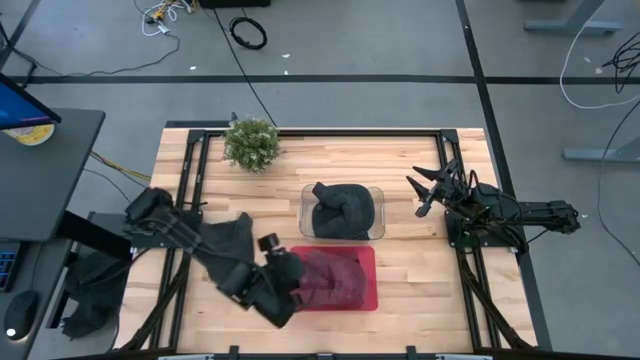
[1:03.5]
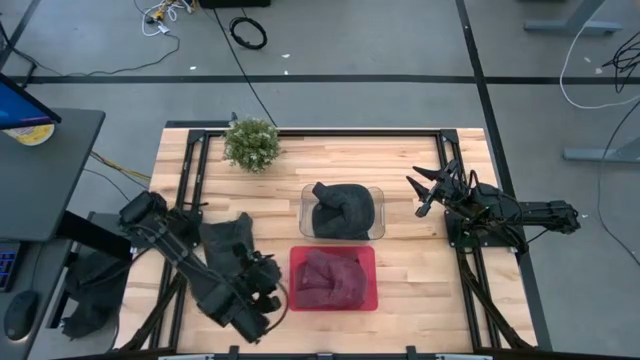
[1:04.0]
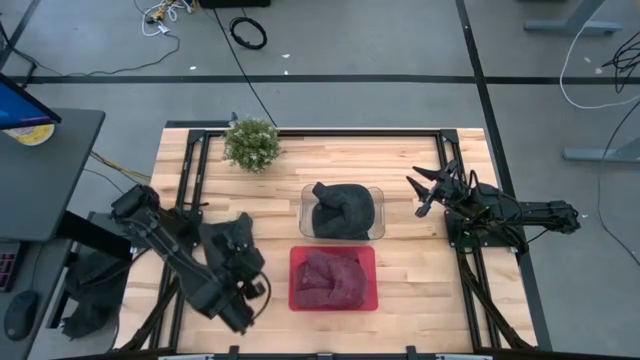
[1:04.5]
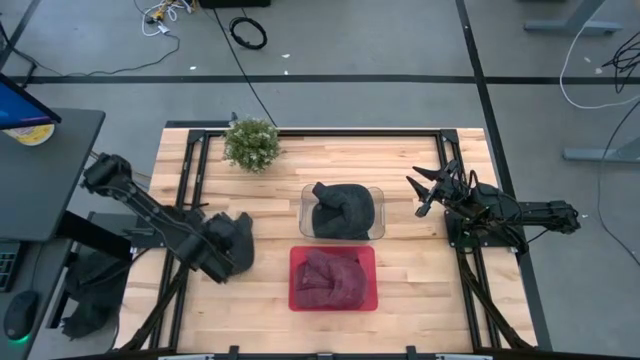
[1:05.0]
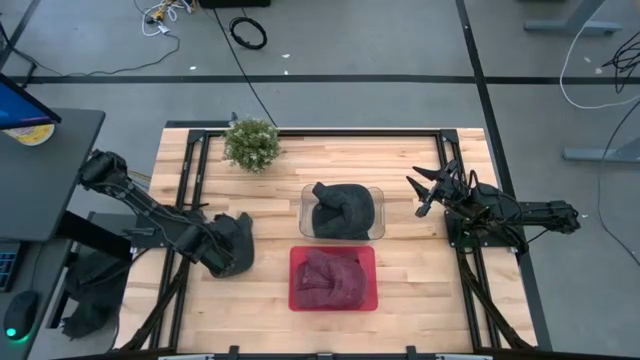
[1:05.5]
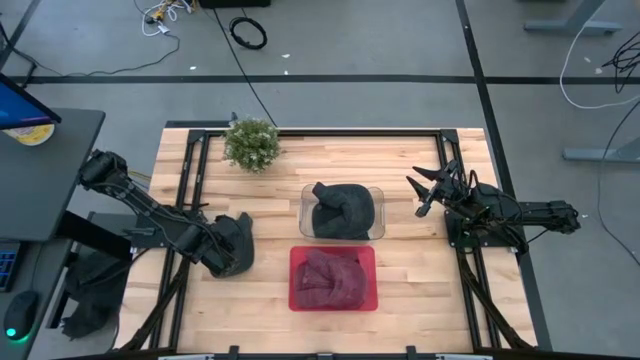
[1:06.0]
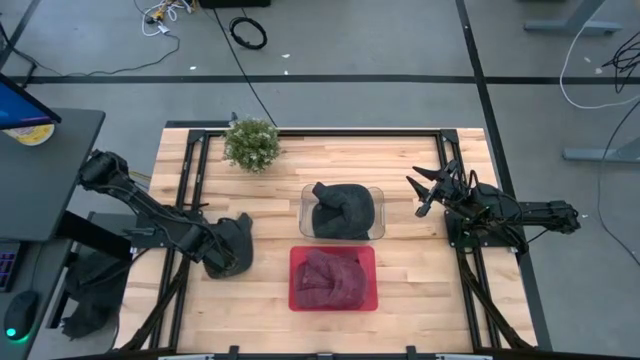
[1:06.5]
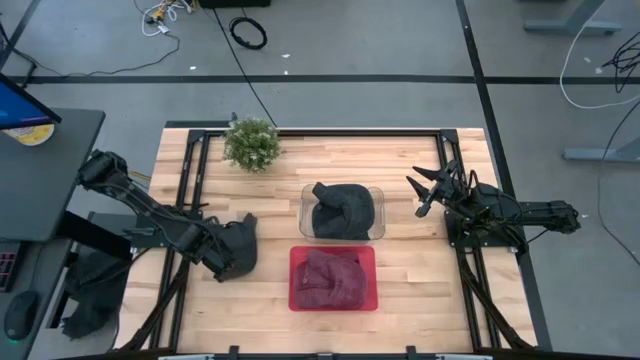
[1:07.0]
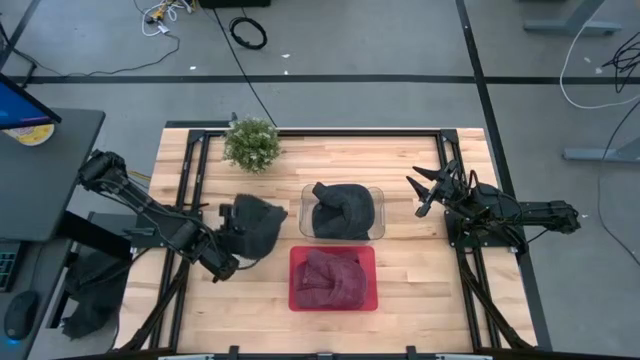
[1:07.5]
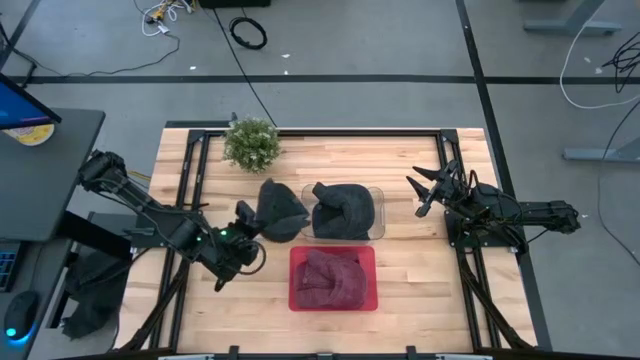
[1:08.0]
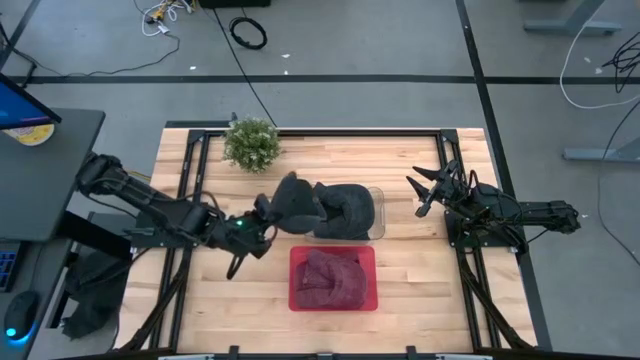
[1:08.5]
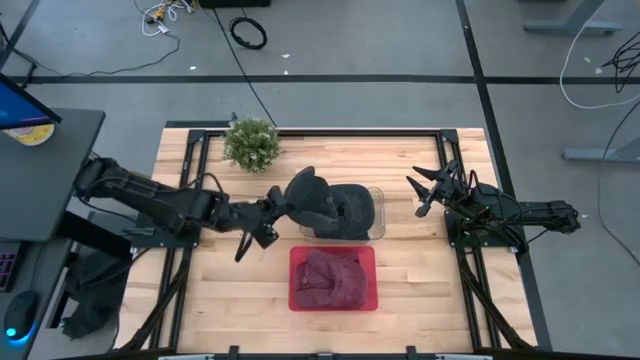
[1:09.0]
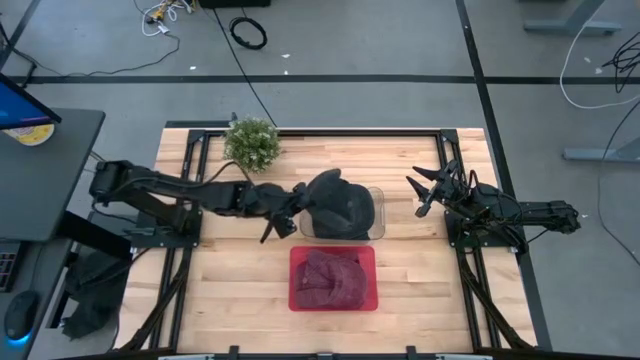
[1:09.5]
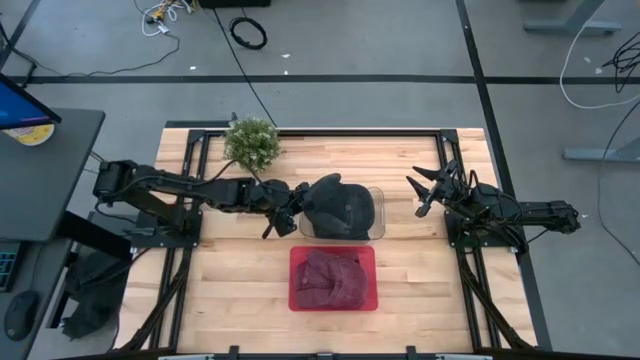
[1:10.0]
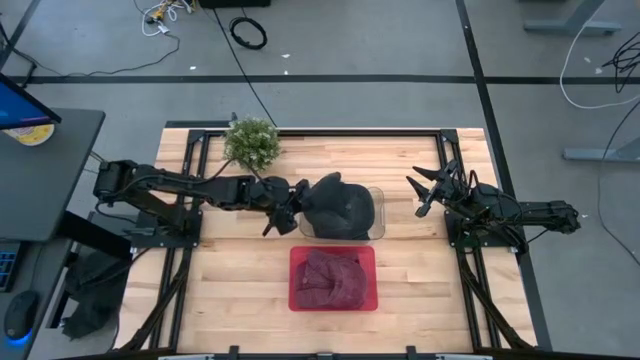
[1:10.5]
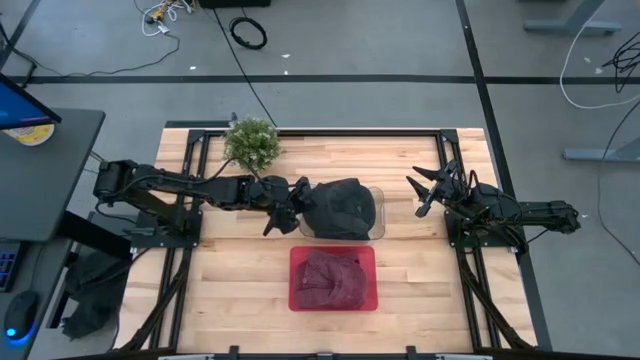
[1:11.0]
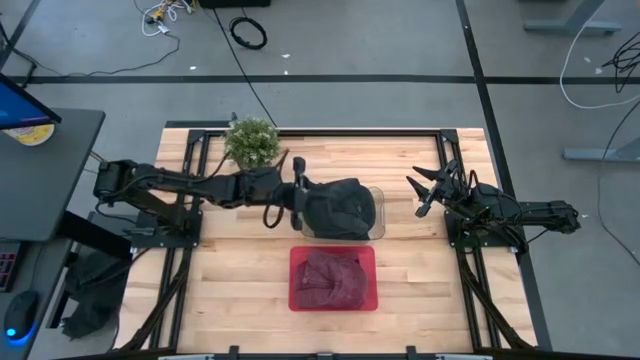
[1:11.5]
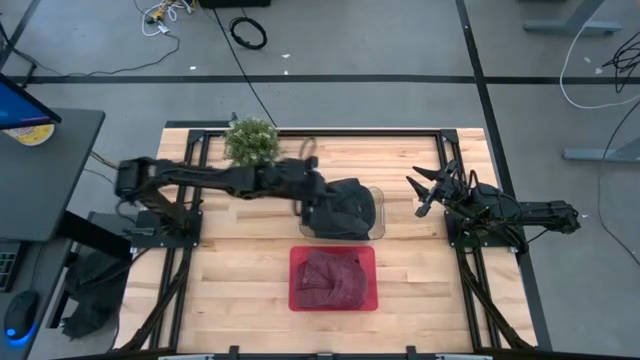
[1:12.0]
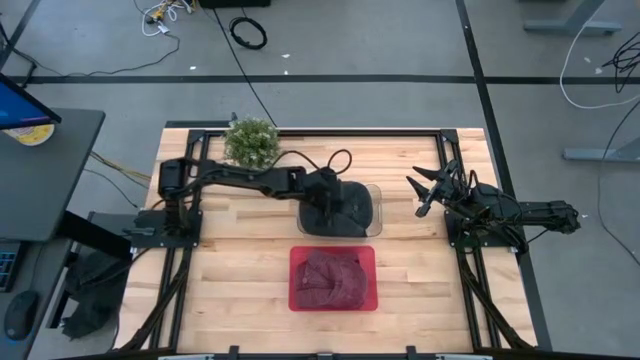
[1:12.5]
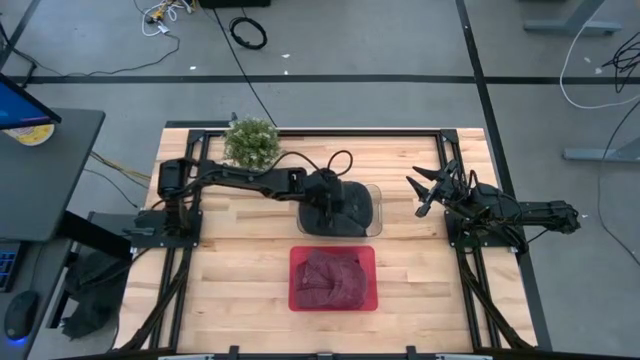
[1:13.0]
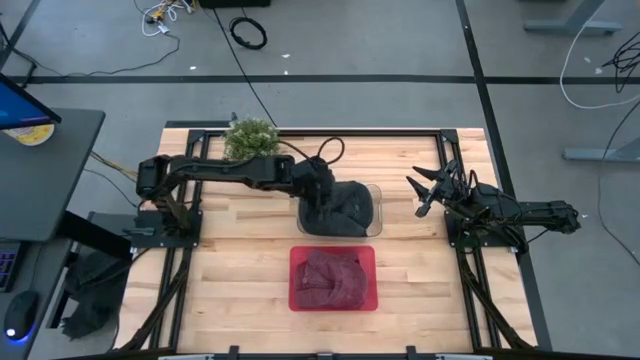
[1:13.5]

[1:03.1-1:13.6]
Task: Pick & Place hat
Put the black cap into the transparent bin

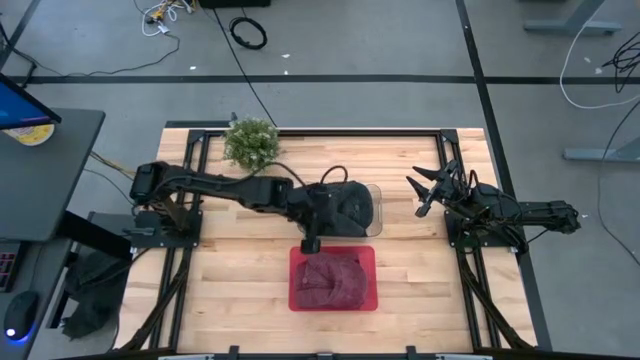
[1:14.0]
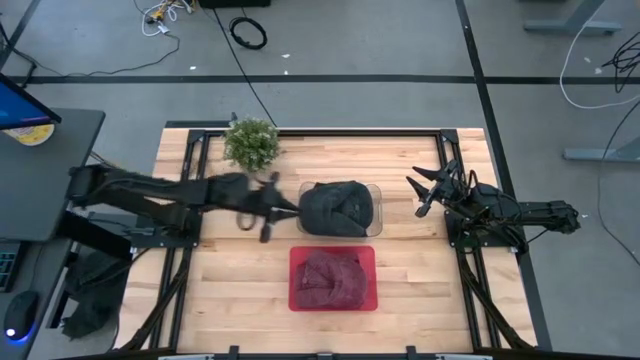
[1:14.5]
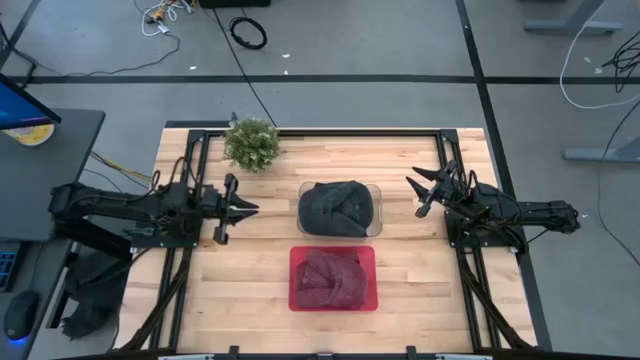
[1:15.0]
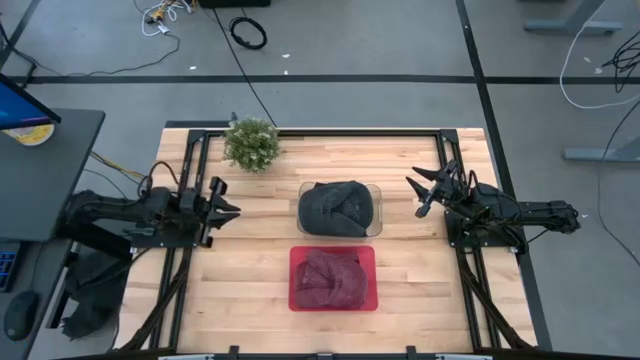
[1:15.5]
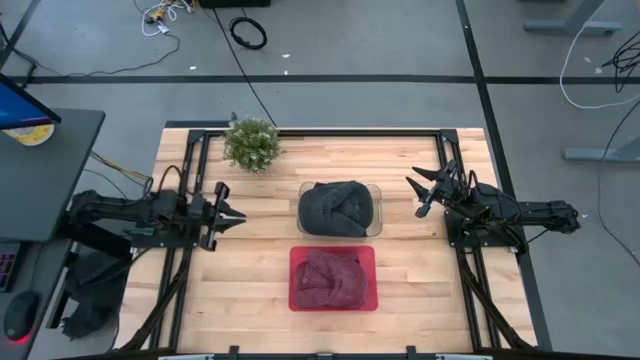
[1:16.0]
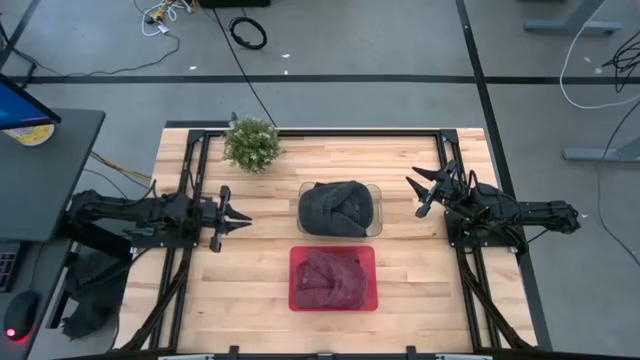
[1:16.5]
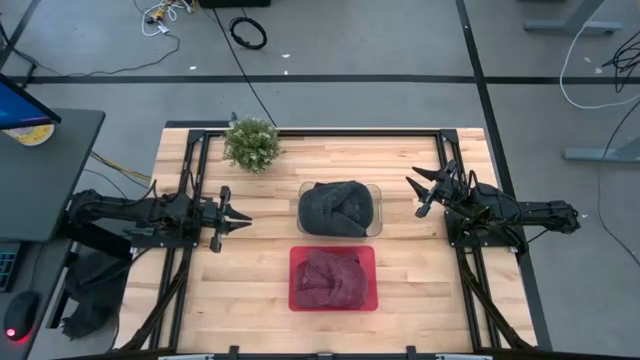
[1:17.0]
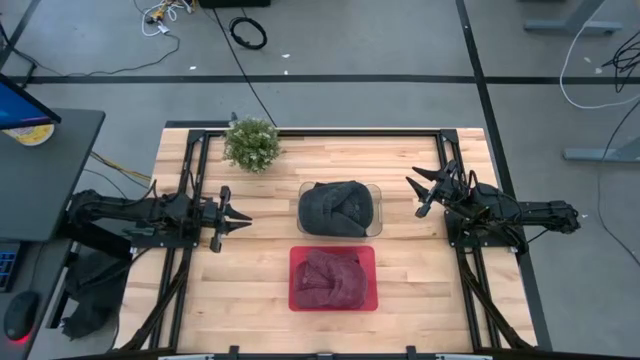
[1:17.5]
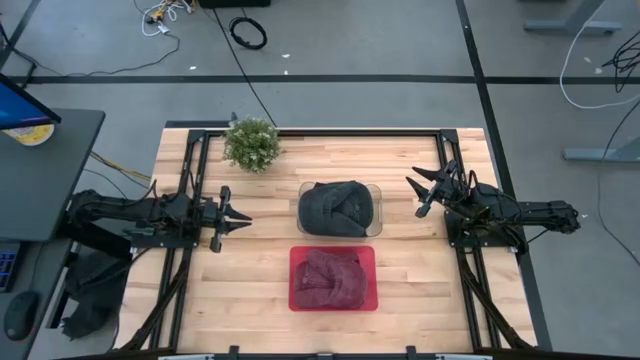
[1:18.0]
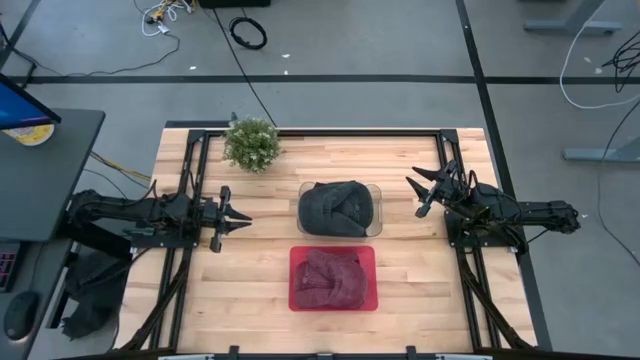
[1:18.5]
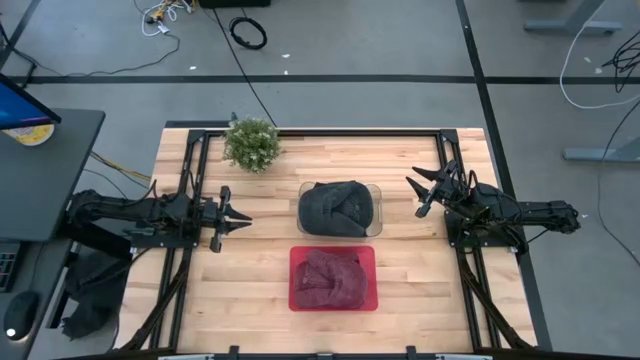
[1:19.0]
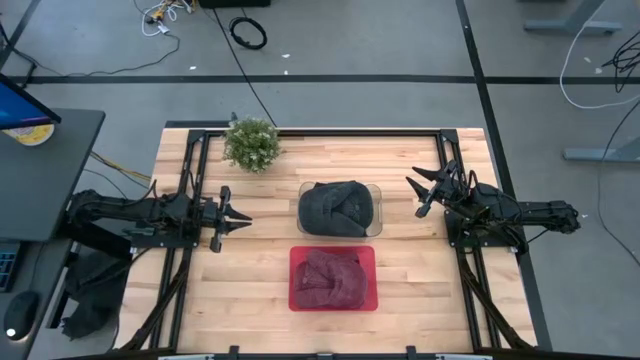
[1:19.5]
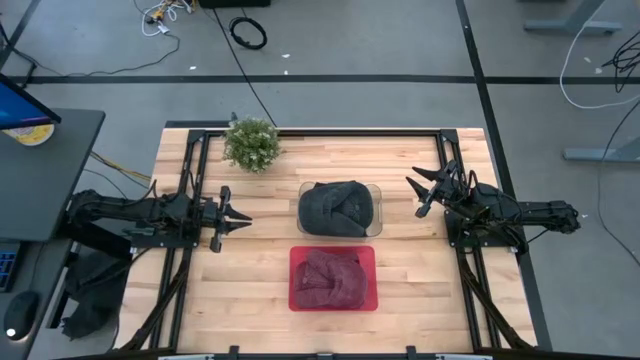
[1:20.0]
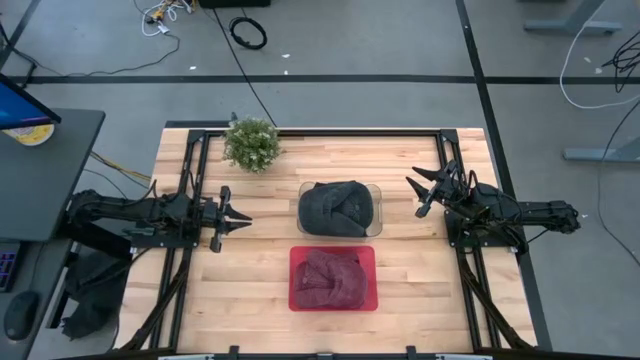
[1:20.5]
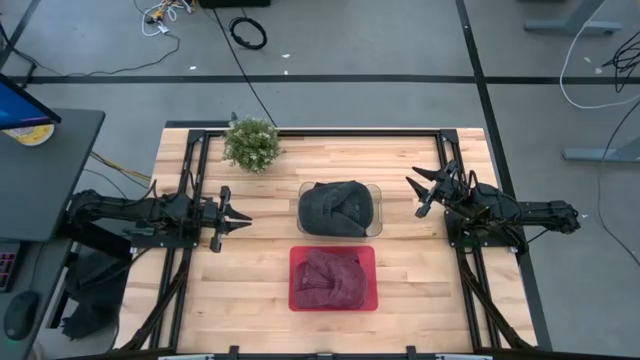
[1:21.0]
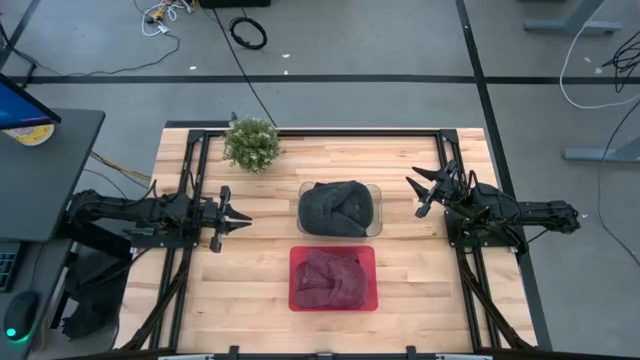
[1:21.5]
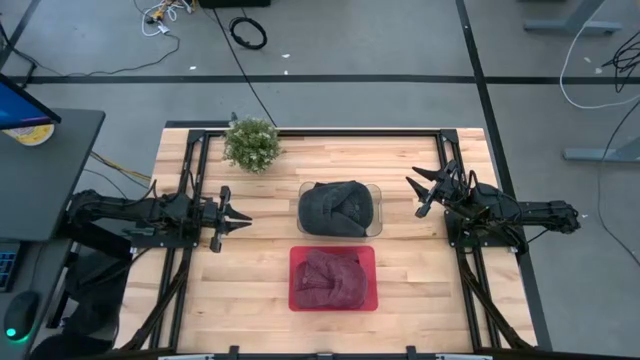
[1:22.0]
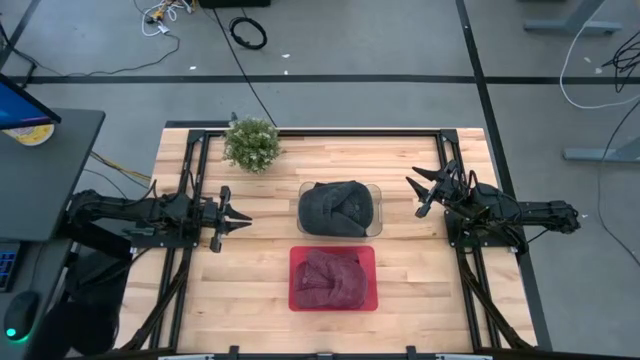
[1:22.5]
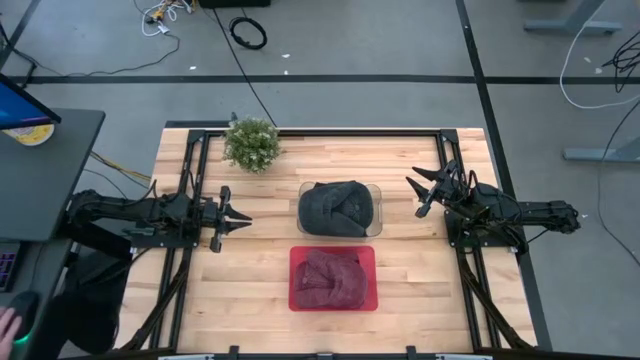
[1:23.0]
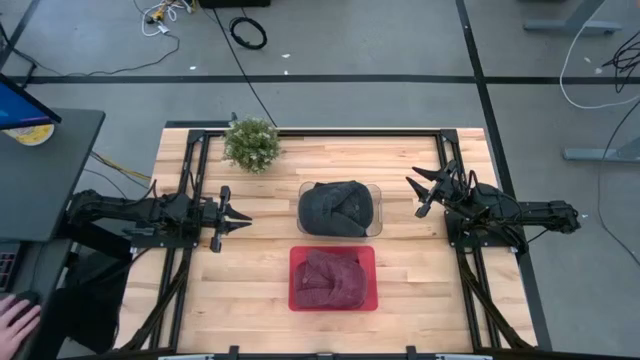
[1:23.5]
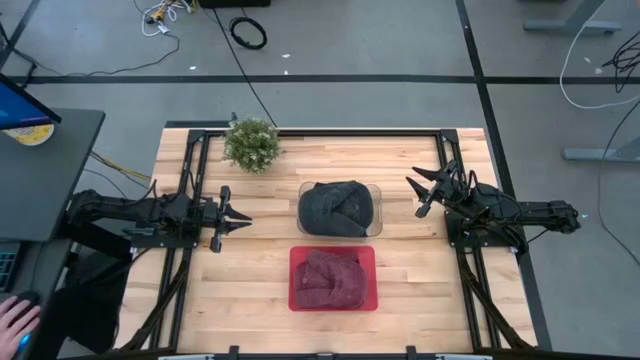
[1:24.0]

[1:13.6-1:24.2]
Return to Home Position
